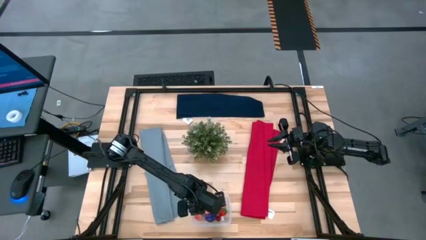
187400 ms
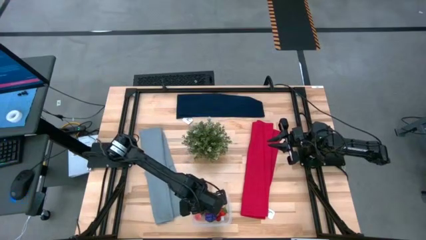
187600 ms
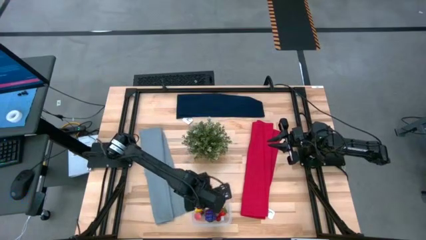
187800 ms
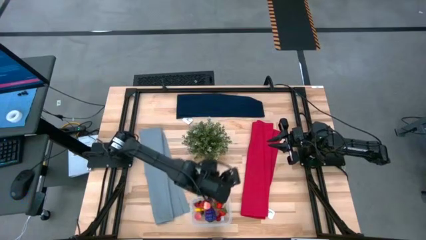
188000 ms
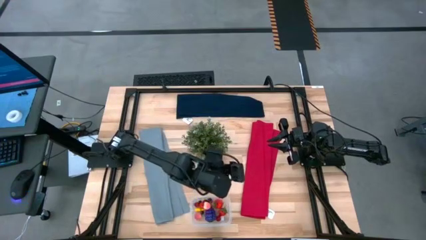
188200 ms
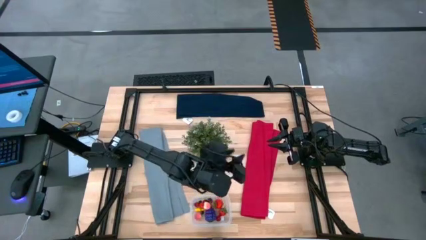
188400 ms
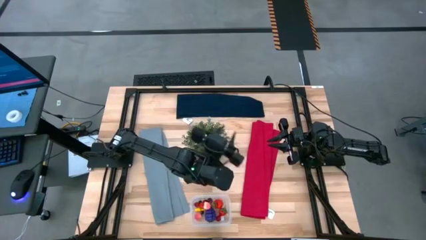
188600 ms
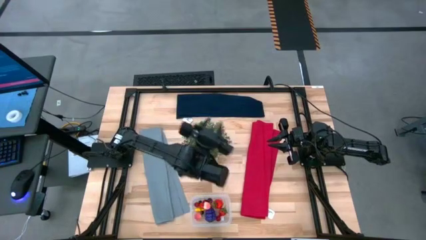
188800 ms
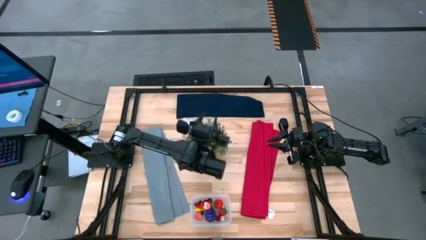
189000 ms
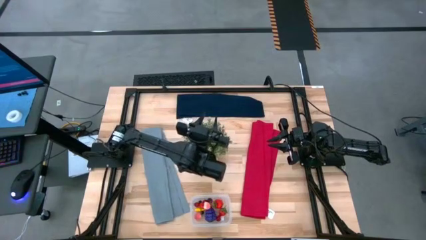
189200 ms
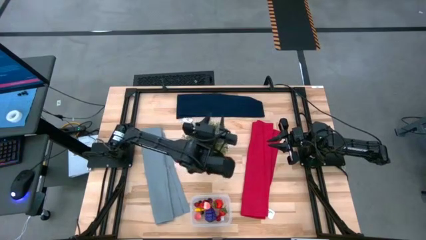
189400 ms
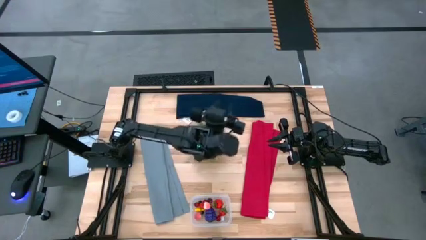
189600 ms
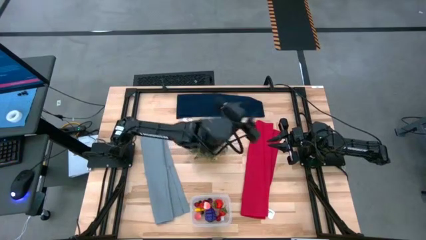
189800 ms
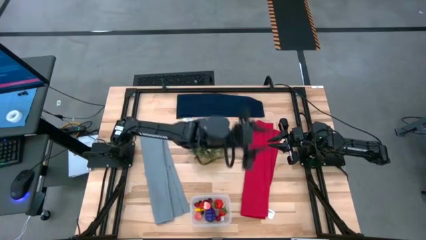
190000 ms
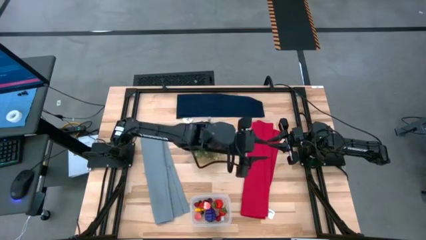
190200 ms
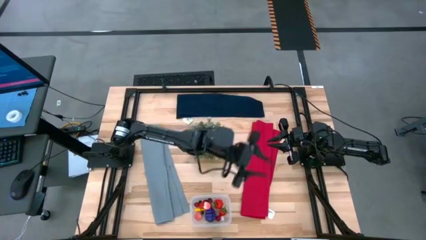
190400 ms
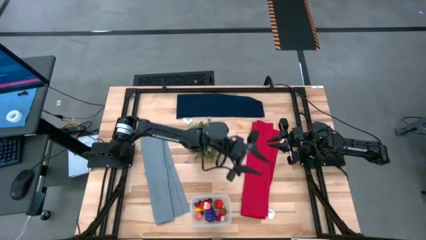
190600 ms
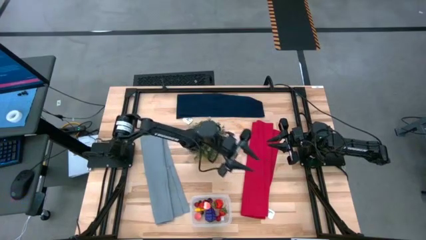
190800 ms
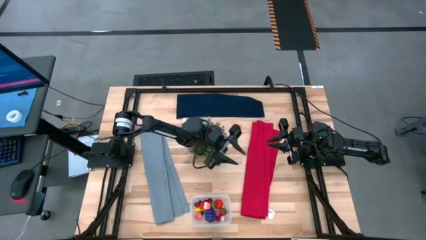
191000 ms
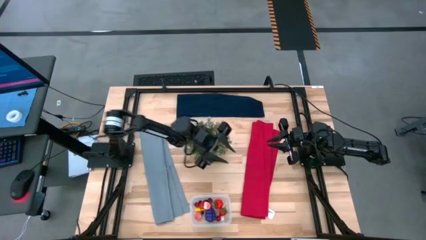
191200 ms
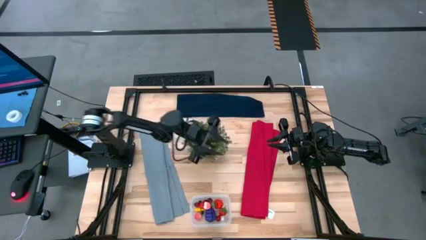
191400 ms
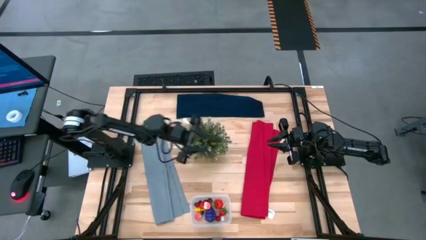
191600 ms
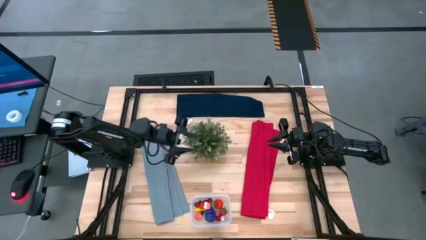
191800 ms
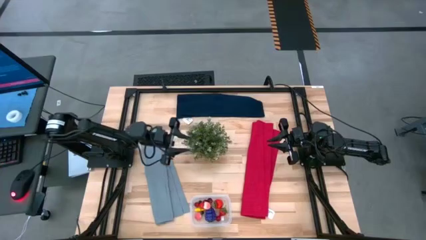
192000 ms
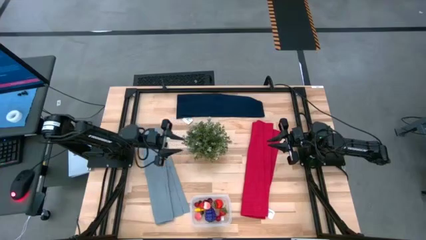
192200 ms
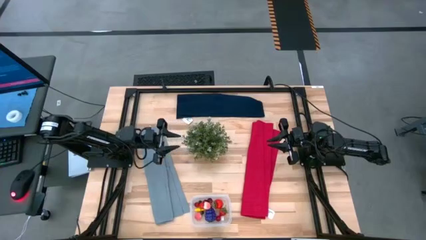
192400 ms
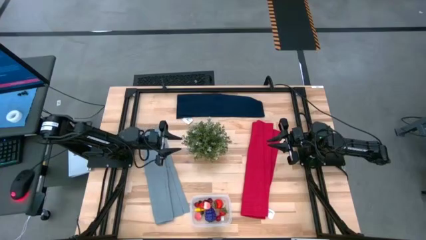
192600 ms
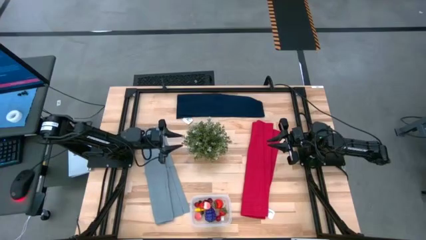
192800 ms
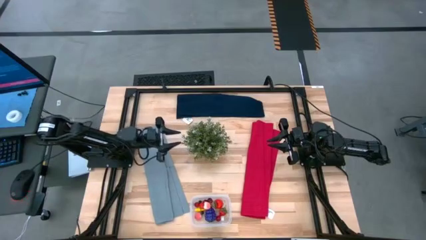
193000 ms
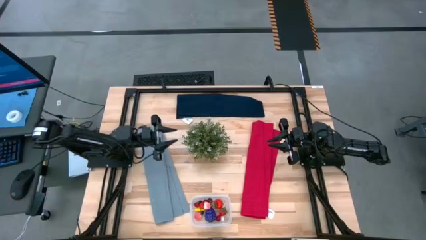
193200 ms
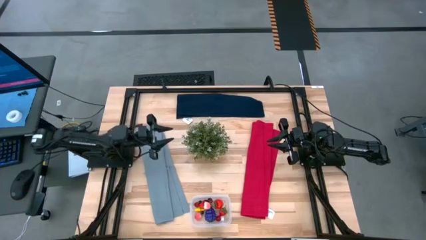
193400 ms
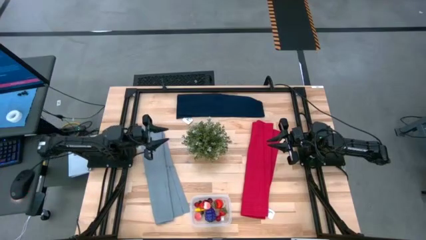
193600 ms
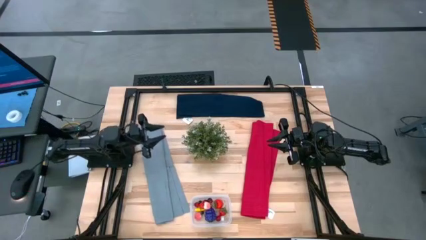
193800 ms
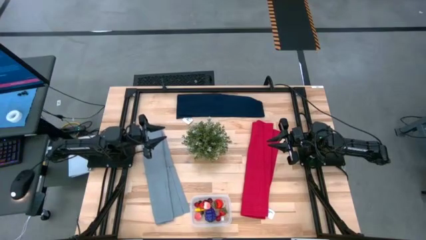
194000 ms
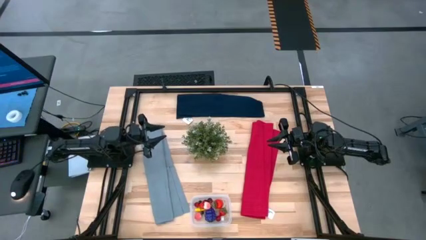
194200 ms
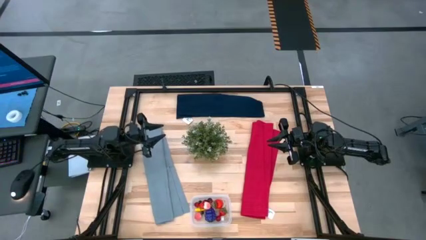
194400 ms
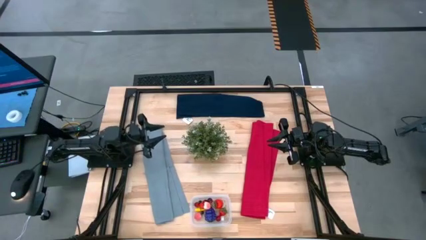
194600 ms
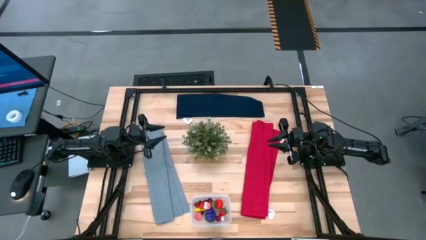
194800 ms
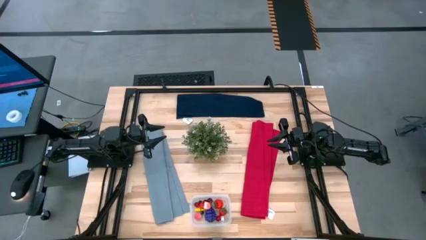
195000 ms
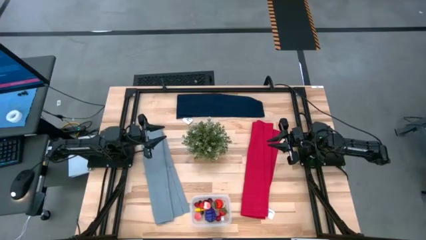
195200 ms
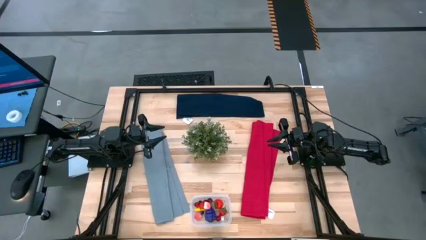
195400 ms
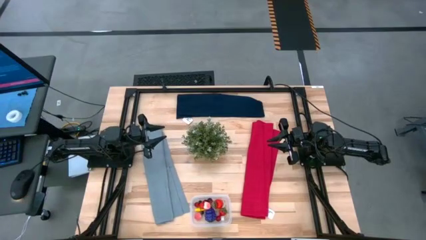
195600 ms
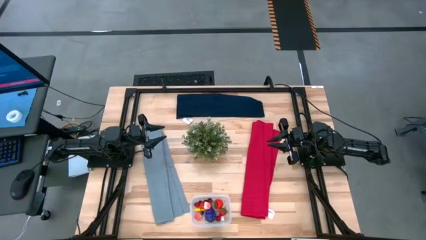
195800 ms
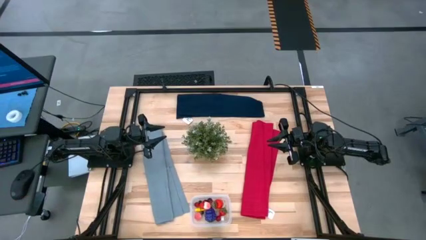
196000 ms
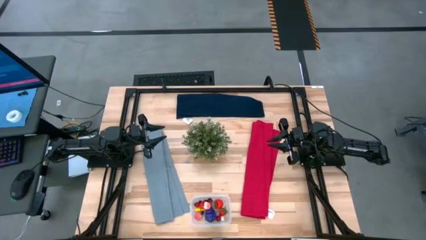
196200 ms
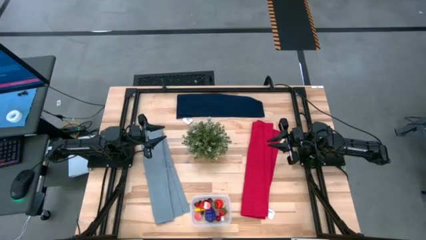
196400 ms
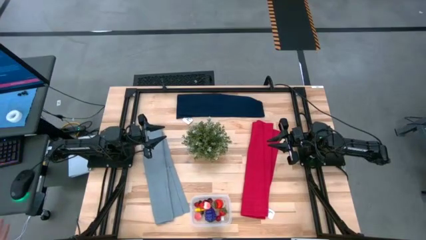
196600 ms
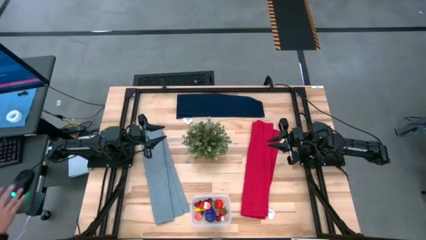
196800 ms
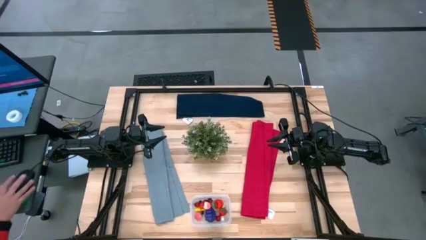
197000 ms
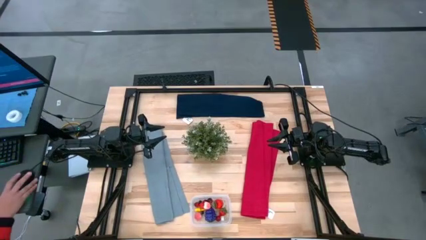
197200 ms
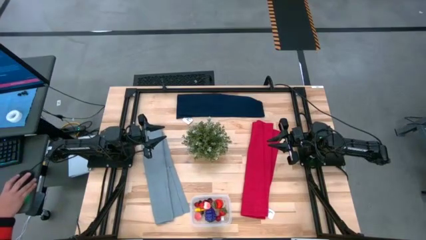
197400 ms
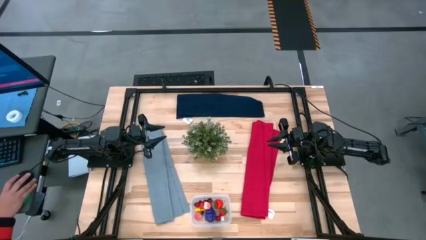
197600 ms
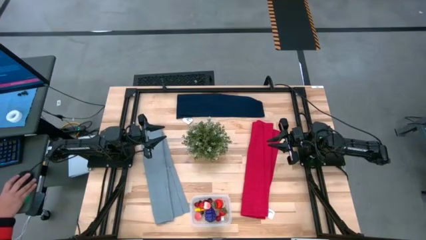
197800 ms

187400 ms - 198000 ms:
Task: Pick and placing Produce into tupperware
Return to Home Position
